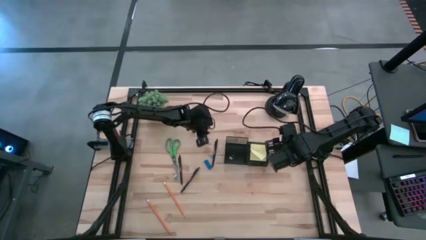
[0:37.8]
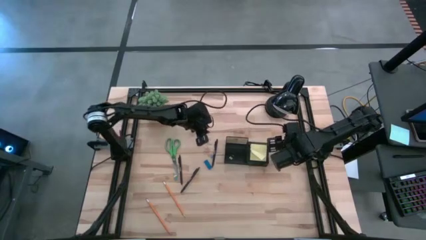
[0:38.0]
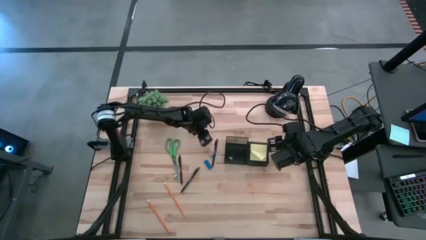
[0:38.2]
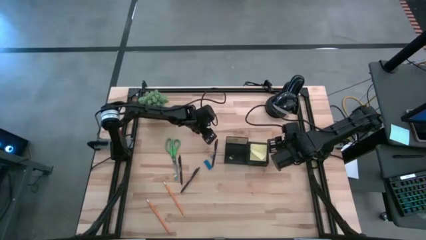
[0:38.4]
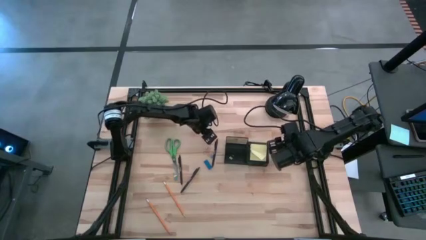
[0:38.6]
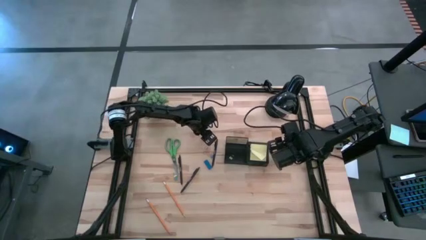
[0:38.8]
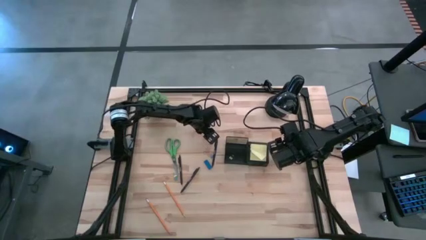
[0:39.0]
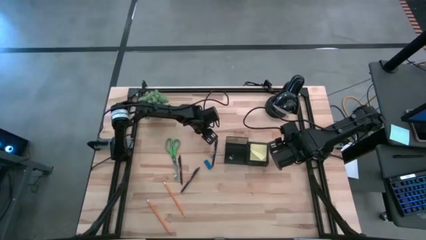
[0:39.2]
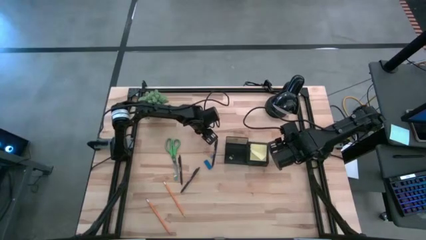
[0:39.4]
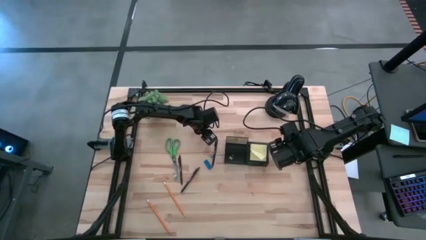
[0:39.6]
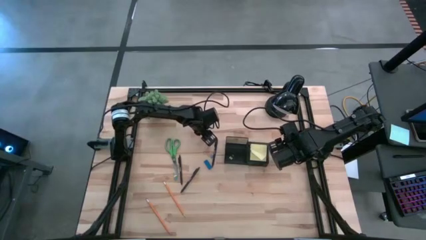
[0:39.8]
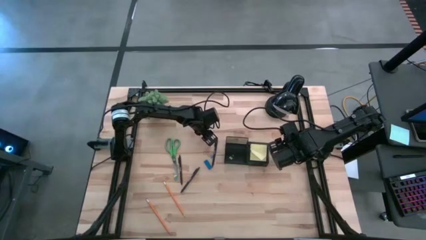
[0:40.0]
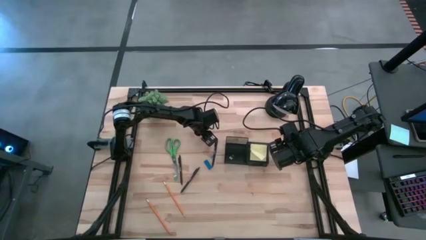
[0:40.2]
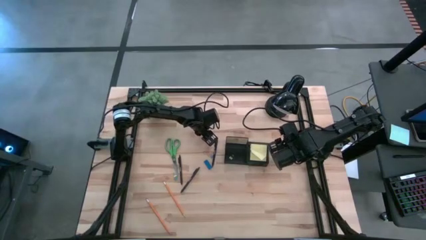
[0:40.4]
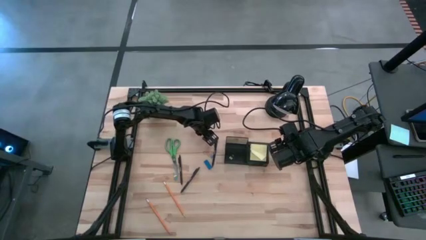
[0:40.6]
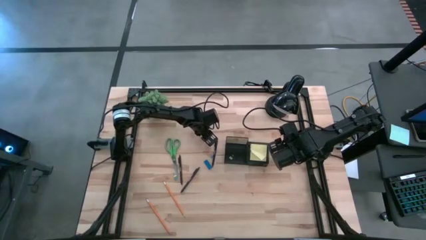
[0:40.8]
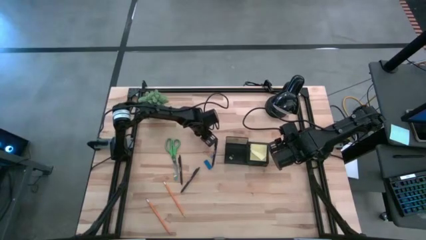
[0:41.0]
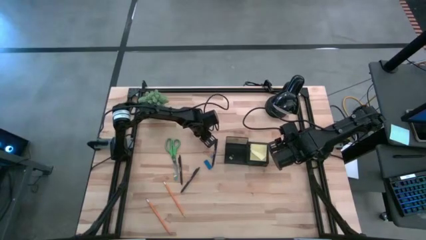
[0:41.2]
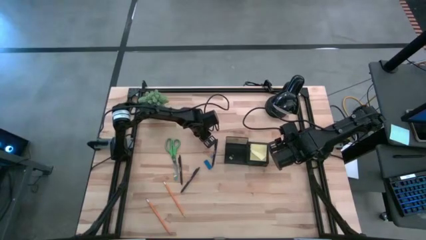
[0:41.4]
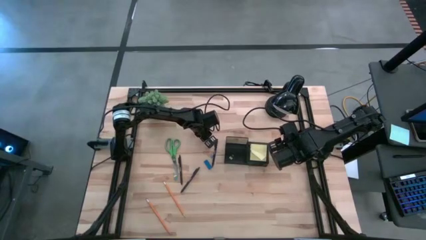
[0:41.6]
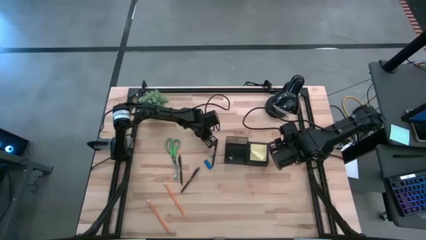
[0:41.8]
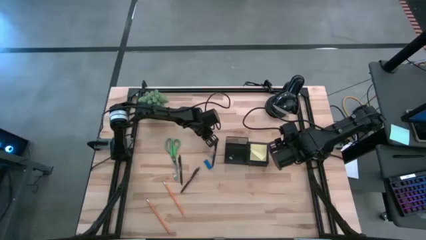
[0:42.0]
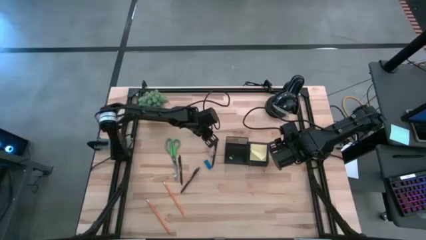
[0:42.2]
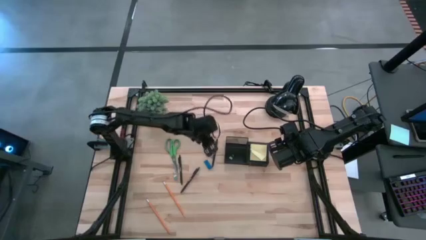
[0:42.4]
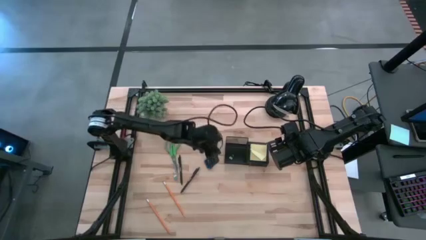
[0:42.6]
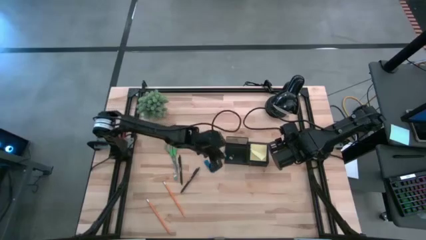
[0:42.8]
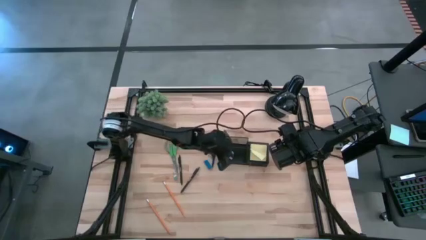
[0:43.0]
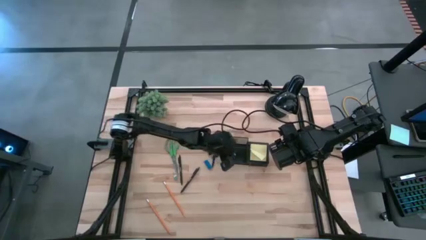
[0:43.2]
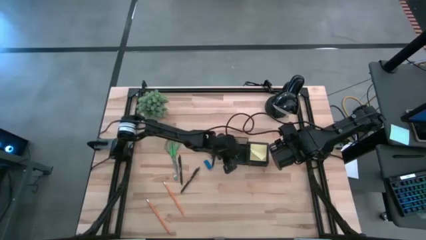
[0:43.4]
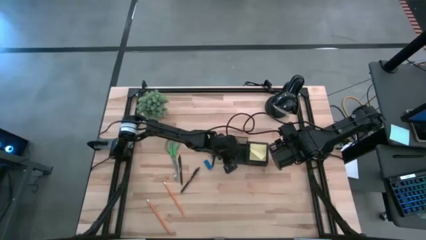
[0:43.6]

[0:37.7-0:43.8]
Task: Pick and place office supplies into organizer
Put the top blue binder clip into the black mesh organizer

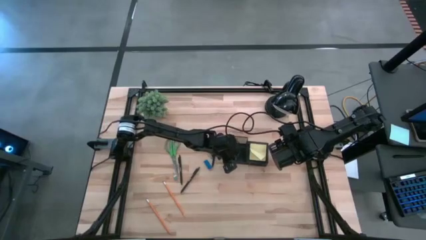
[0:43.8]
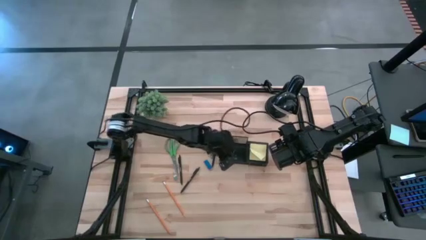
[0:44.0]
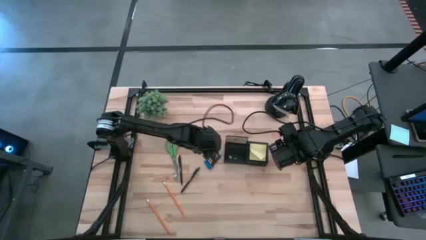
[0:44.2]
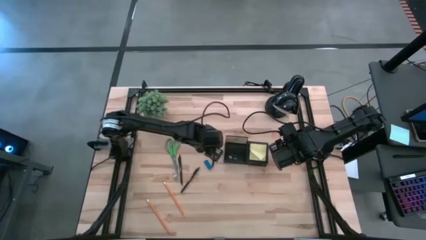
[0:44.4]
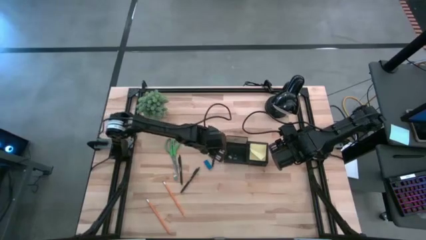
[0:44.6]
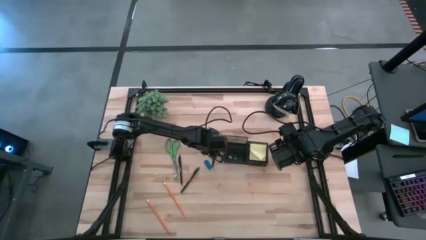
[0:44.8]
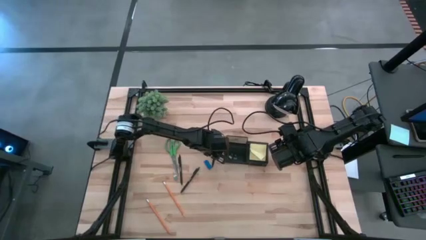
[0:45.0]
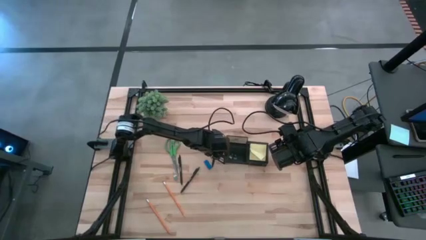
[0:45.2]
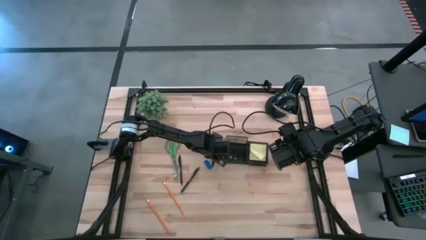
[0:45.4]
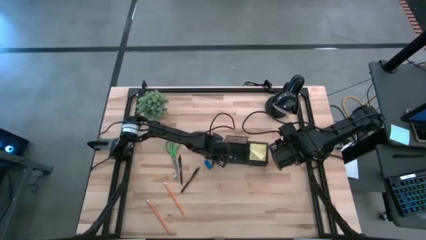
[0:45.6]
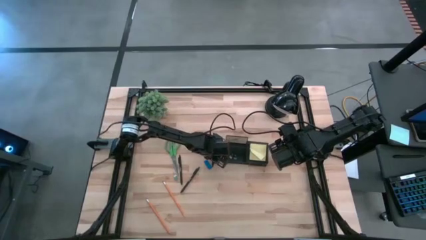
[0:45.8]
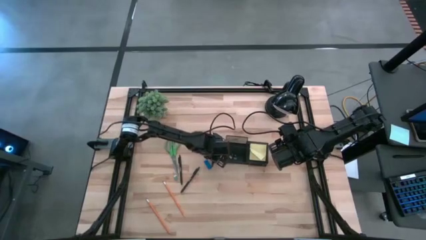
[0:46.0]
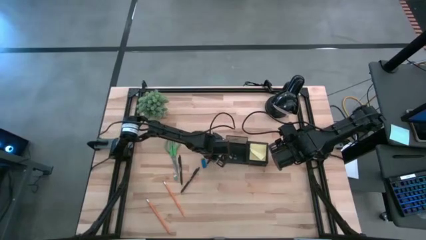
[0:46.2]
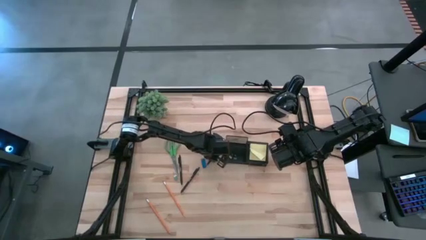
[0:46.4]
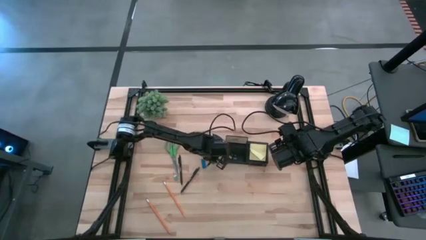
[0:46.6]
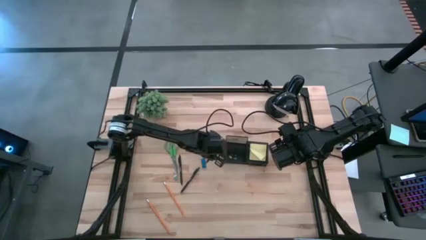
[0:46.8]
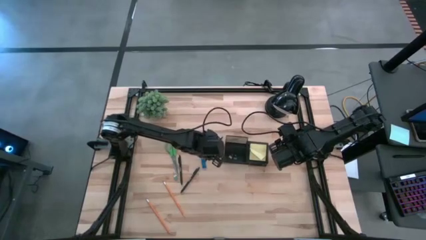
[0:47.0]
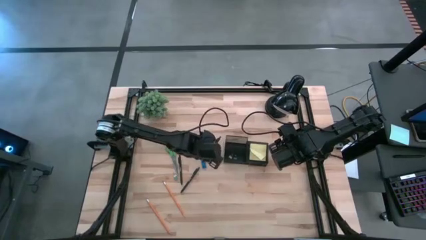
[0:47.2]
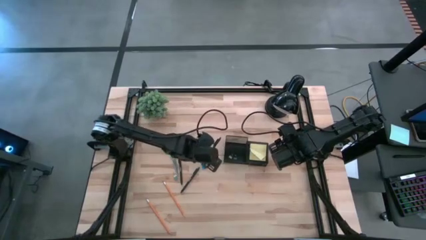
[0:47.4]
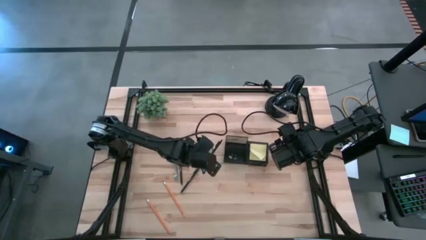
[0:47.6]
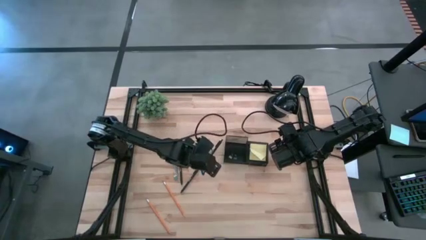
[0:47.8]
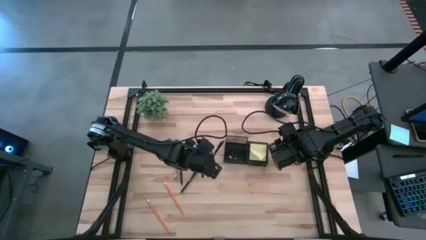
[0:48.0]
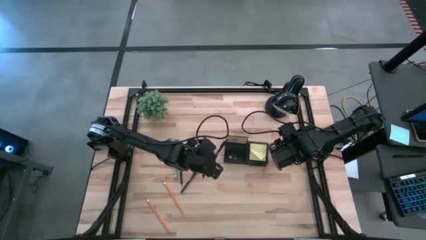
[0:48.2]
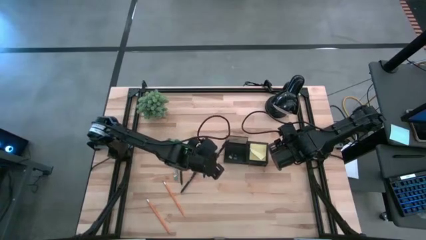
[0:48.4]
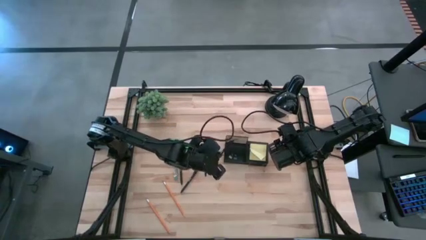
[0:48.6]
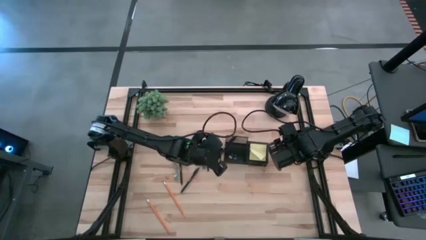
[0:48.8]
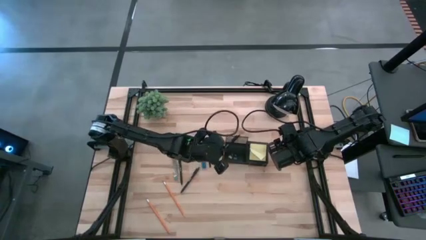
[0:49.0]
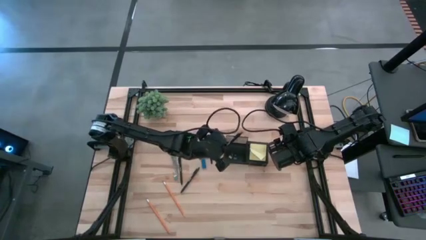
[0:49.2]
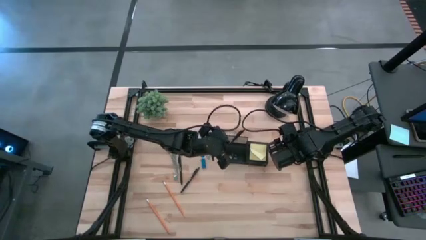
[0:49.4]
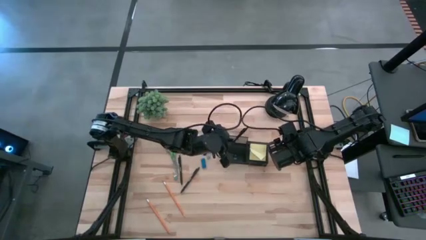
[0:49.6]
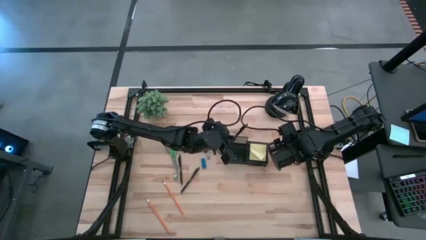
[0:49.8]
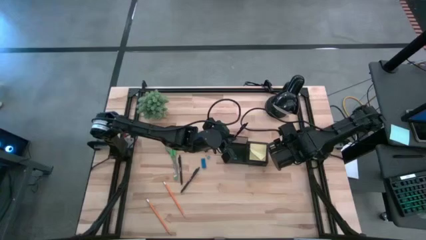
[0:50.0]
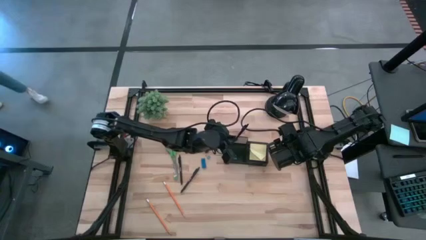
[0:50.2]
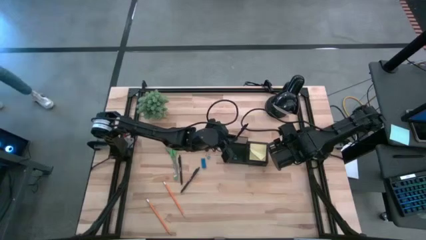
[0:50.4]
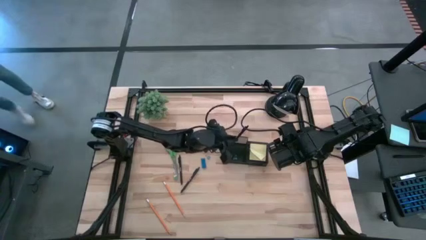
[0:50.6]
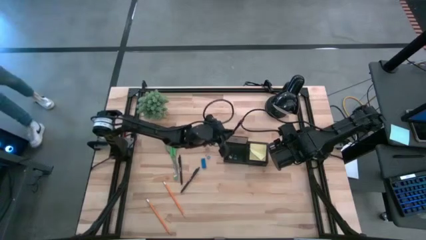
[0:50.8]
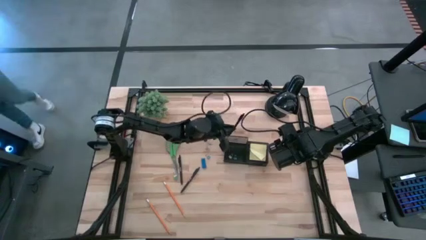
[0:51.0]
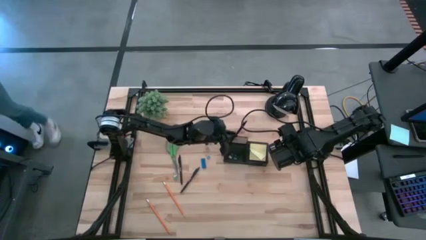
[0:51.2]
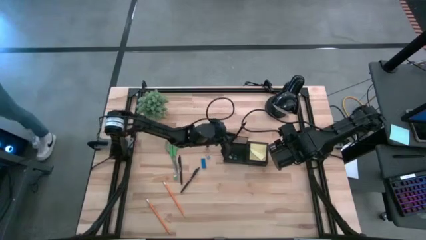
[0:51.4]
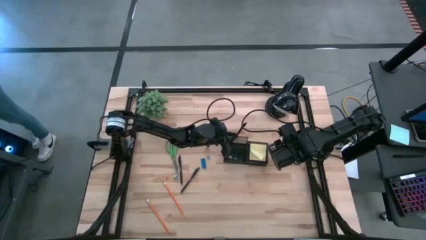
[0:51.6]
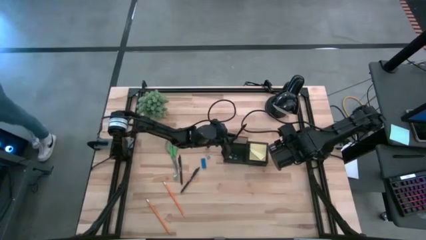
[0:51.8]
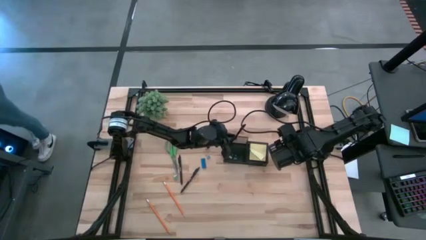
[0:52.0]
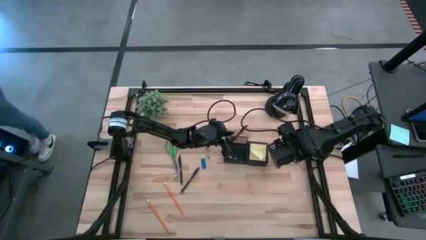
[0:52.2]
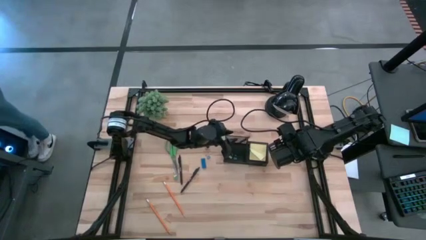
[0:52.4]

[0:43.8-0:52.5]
Put the right black ballpen into black mesh organizer
